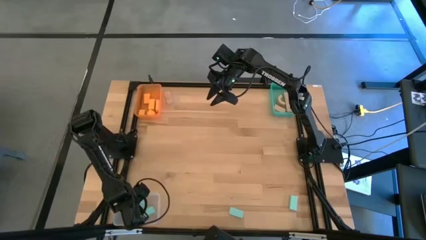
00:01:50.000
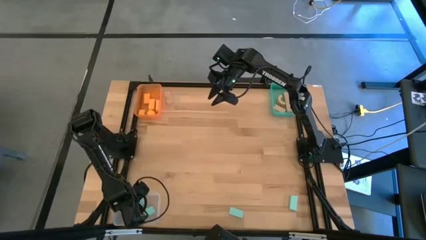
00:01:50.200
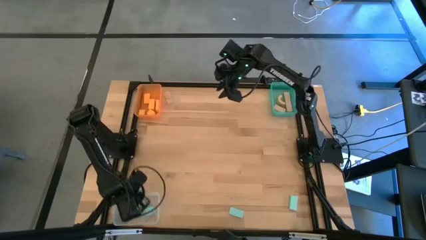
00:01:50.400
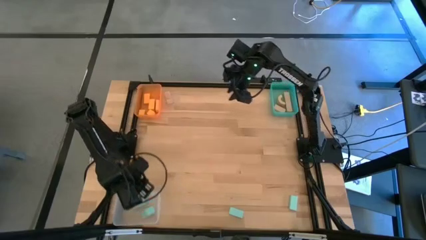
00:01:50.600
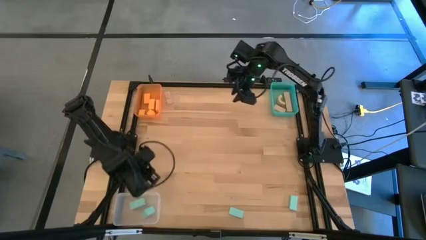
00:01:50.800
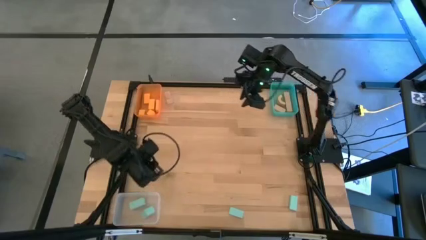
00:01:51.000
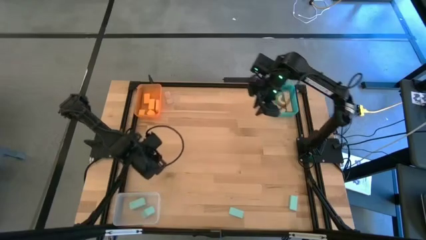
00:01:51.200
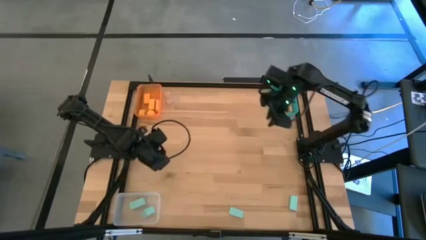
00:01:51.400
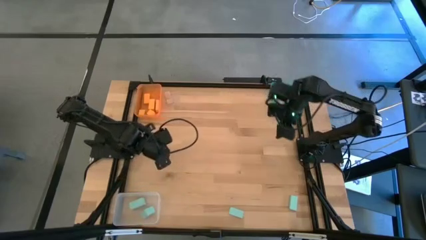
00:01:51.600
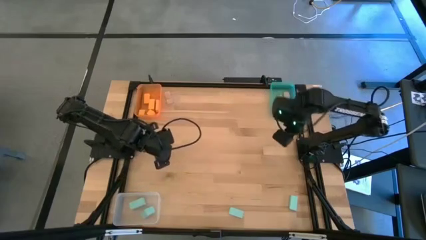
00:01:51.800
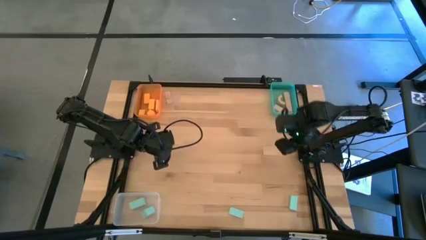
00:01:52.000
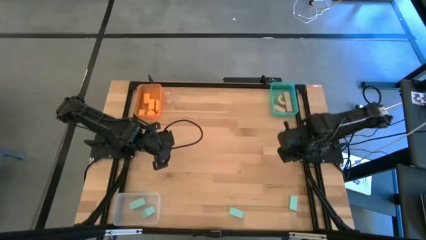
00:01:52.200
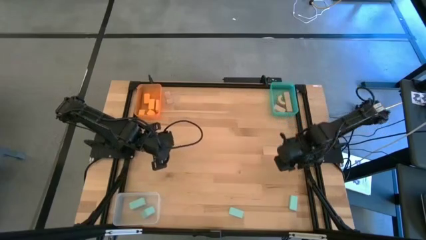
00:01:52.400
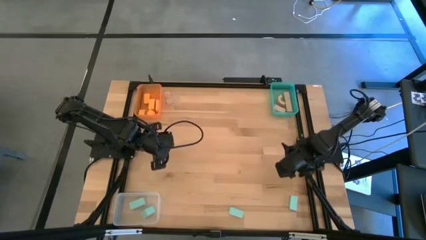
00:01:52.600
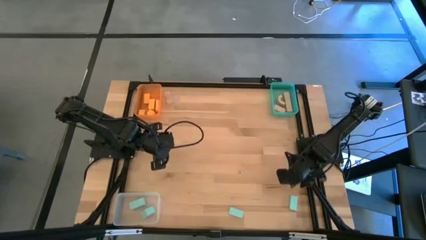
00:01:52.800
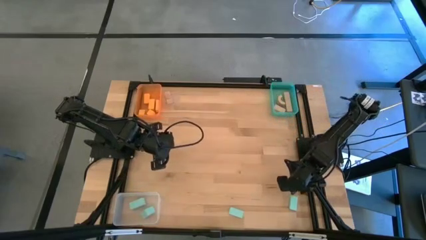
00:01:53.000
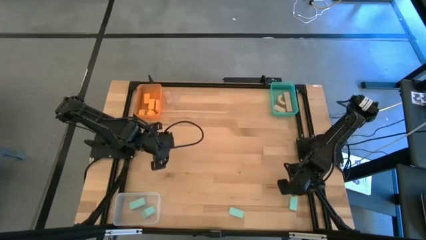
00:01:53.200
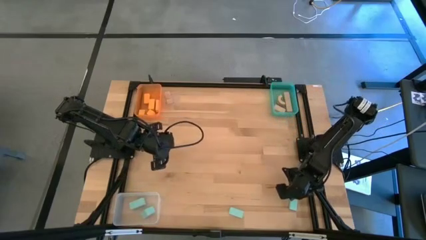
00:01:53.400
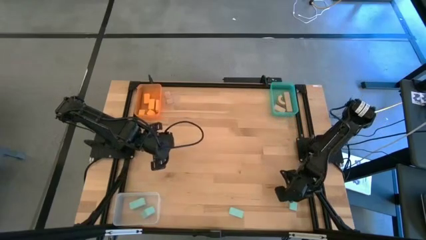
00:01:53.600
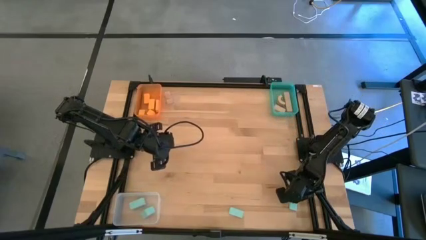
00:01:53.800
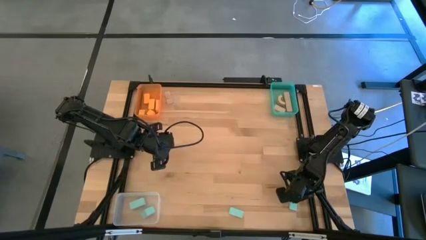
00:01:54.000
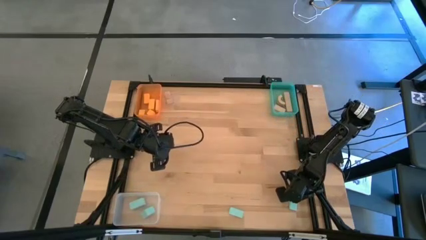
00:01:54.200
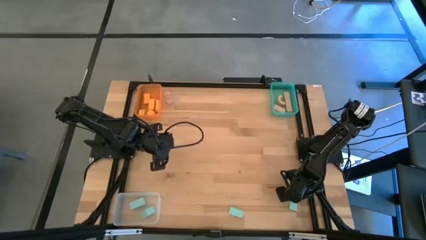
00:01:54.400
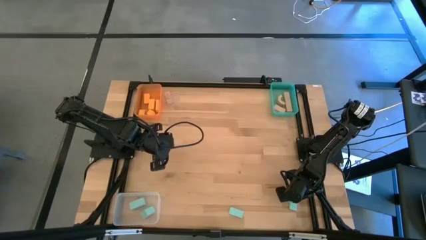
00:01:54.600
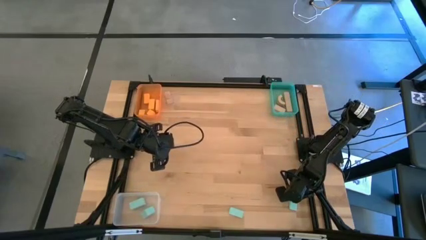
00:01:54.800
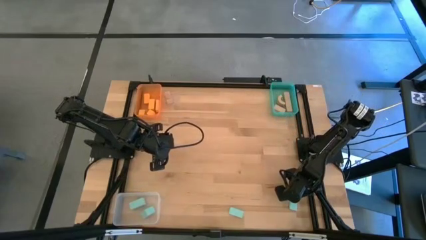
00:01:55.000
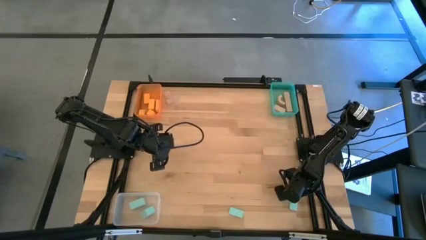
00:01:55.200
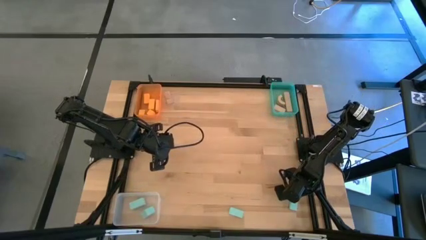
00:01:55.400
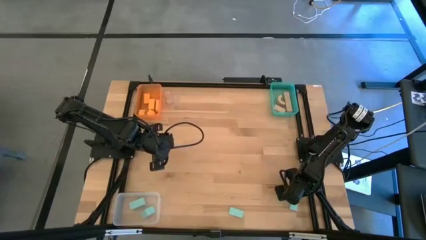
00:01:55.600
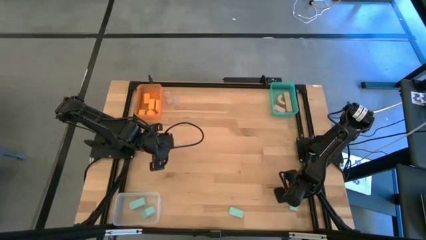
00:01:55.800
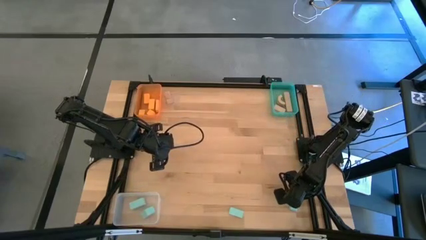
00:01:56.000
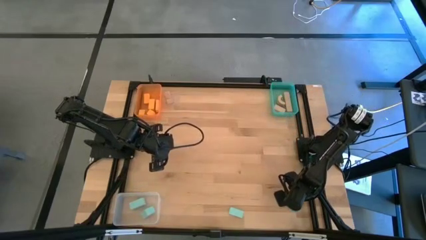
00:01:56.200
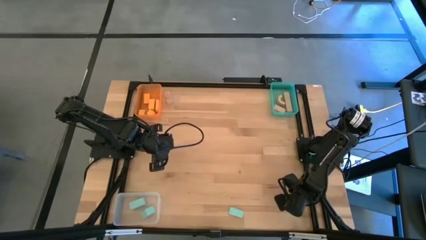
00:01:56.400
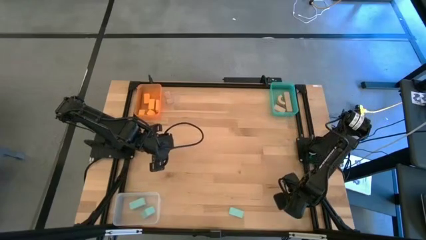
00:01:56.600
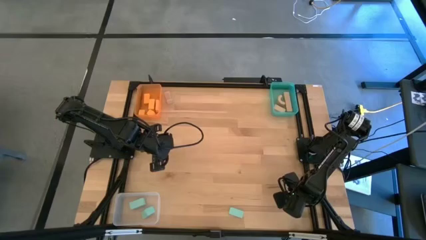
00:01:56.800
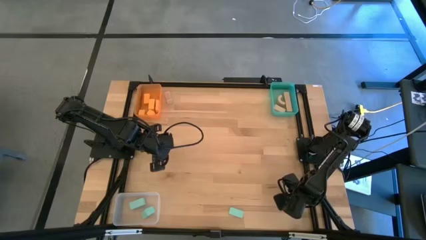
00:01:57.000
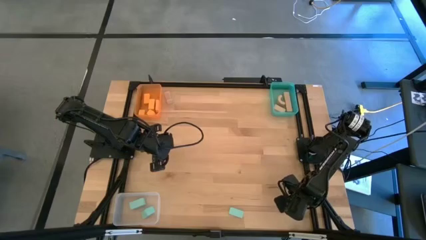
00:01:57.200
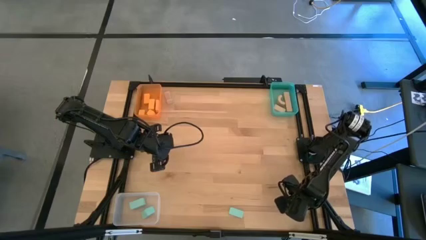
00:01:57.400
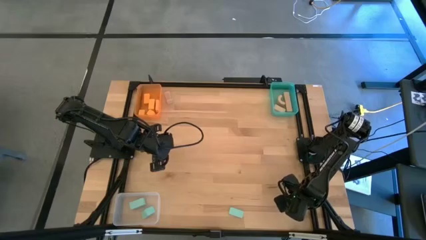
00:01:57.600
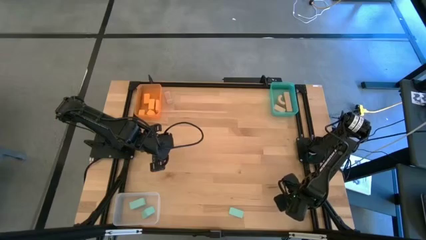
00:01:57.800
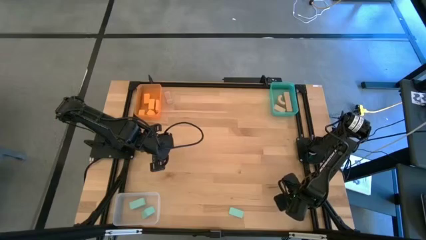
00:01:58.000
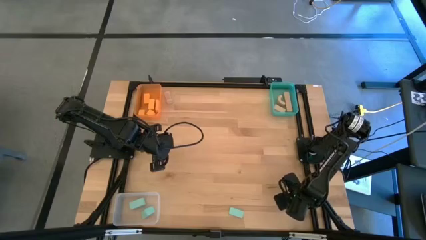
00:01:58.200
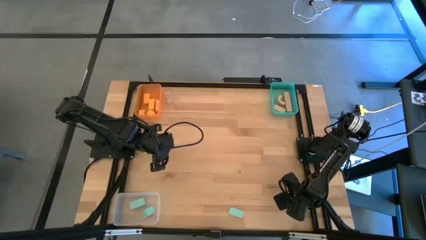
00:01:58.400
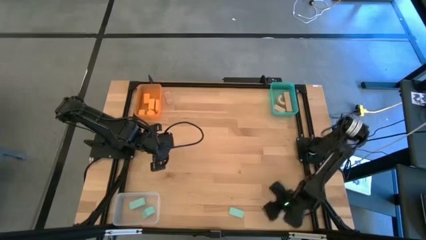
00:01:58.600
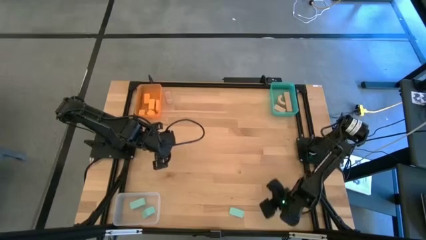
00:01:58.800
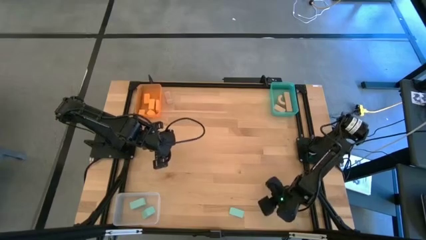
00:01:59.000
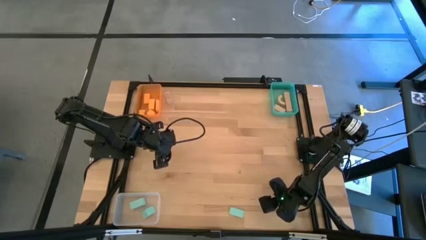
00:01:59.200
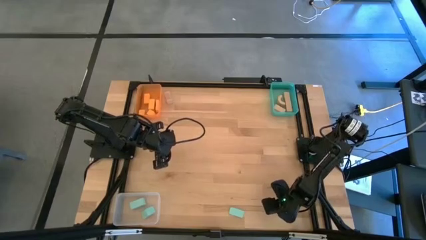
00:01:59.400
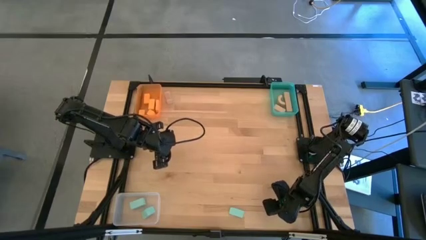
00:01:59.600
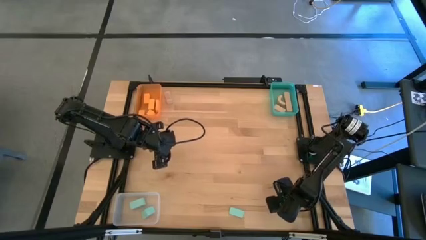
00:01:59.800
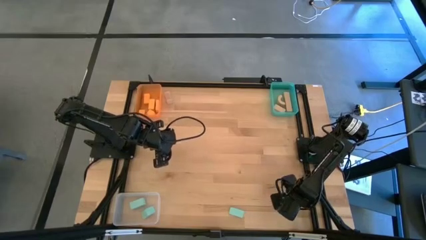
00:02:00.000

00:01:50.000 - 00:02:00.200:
Task: Sort & place blocks by color
Put the blue block into the transparent bin

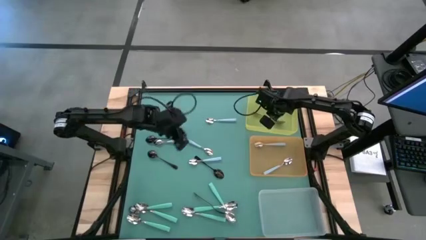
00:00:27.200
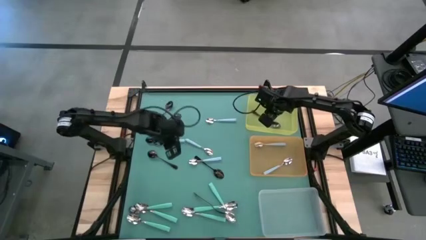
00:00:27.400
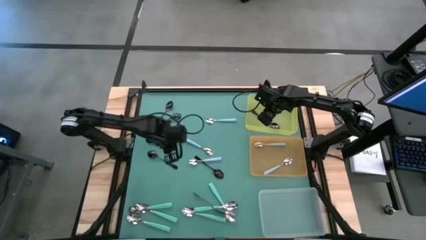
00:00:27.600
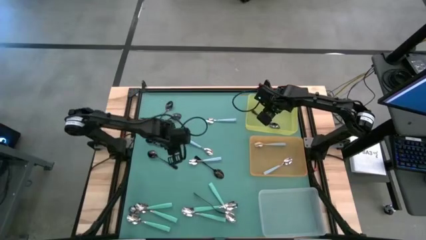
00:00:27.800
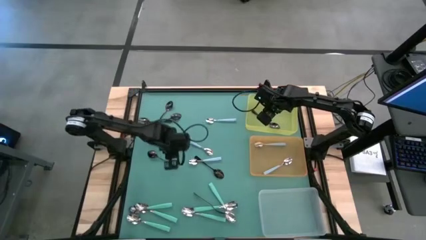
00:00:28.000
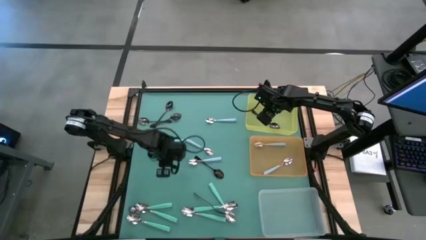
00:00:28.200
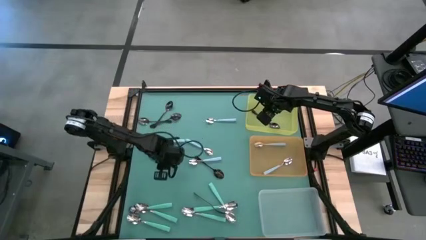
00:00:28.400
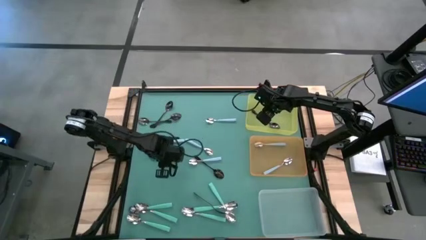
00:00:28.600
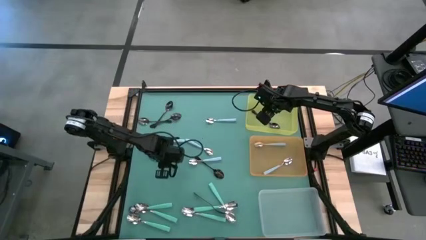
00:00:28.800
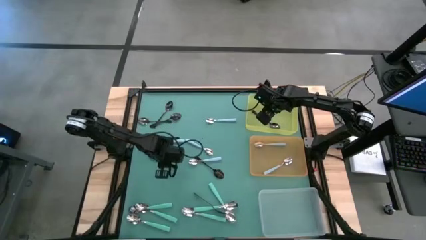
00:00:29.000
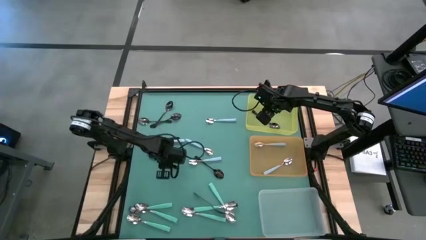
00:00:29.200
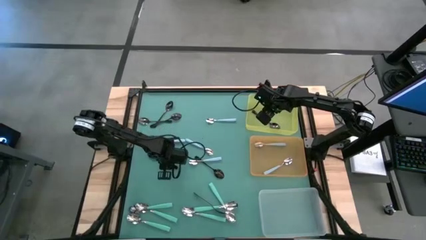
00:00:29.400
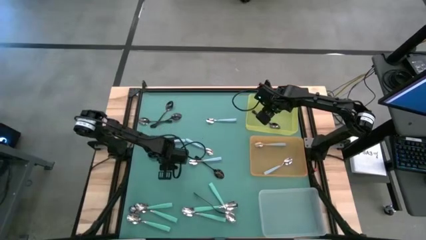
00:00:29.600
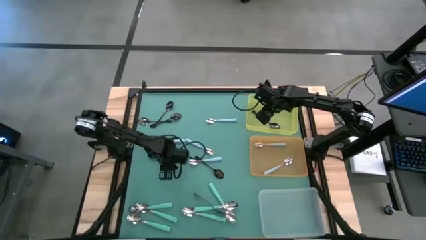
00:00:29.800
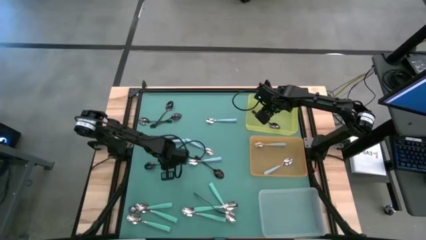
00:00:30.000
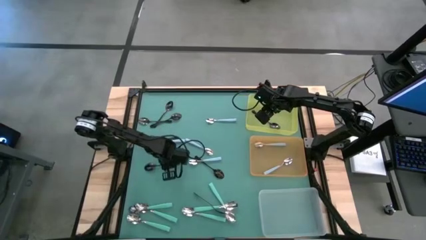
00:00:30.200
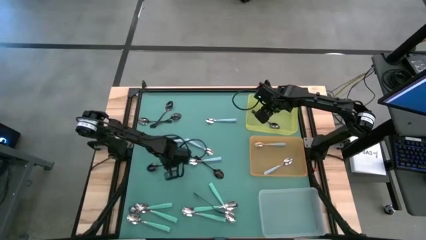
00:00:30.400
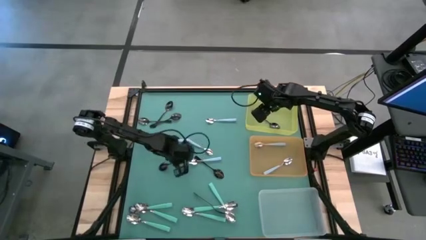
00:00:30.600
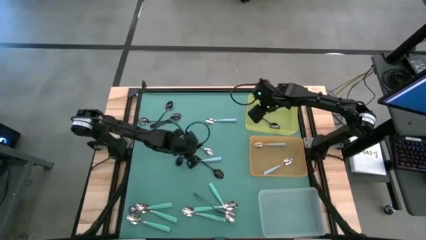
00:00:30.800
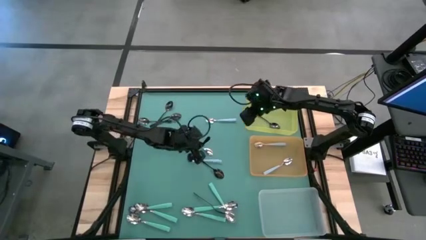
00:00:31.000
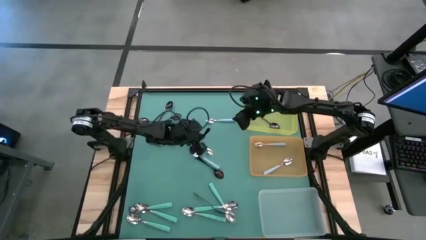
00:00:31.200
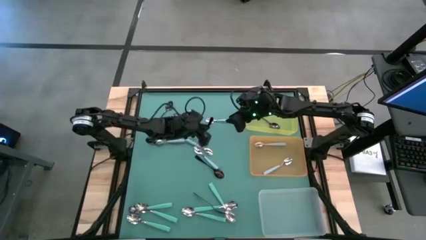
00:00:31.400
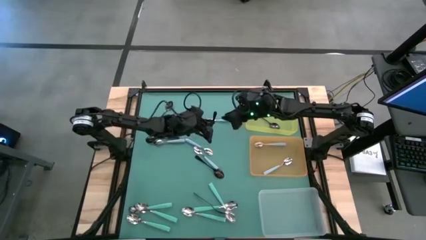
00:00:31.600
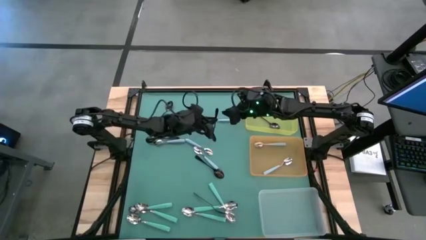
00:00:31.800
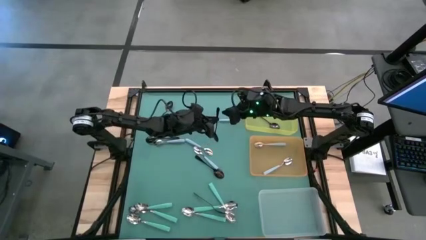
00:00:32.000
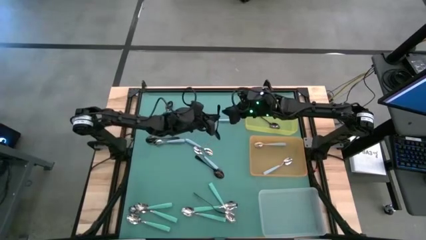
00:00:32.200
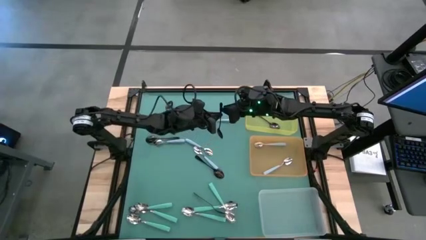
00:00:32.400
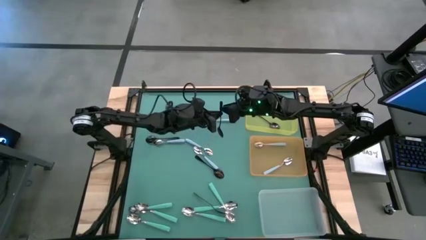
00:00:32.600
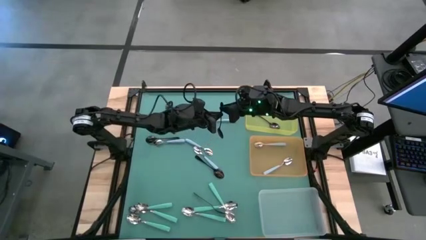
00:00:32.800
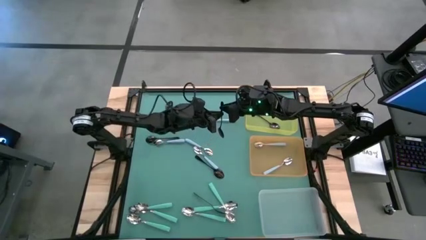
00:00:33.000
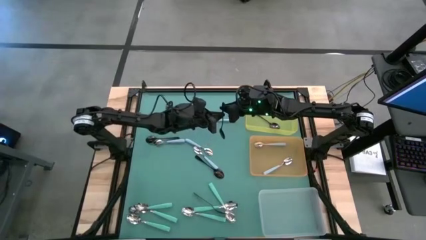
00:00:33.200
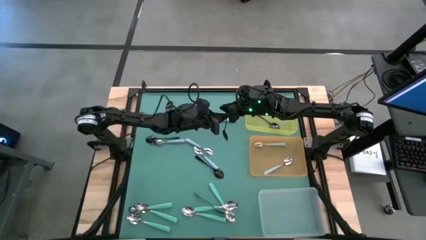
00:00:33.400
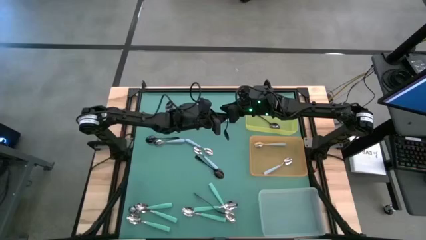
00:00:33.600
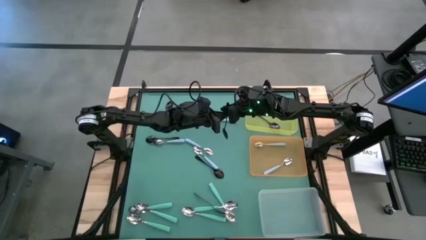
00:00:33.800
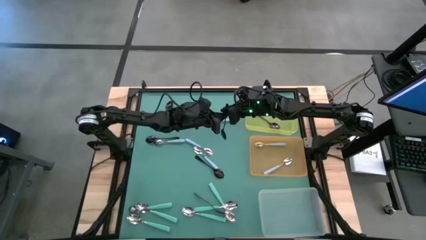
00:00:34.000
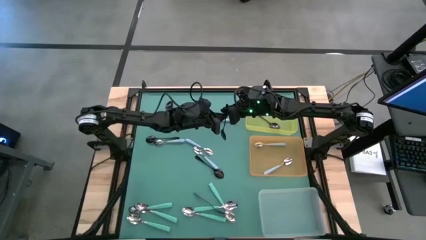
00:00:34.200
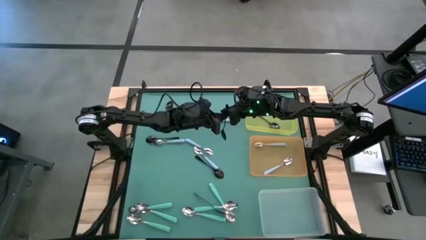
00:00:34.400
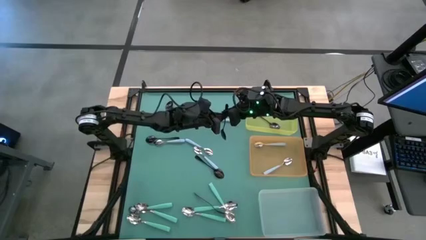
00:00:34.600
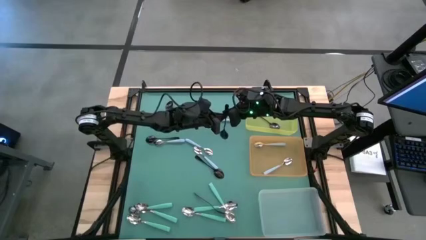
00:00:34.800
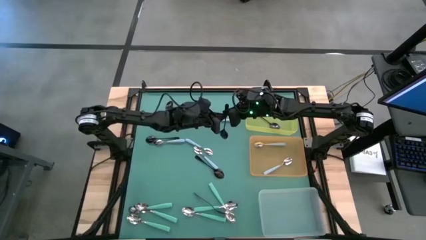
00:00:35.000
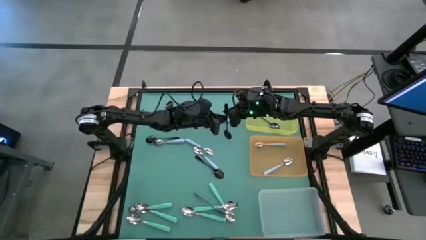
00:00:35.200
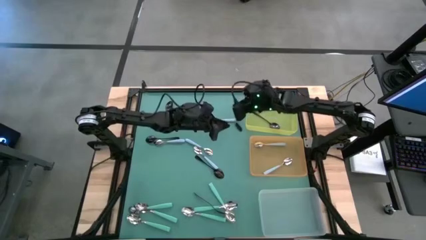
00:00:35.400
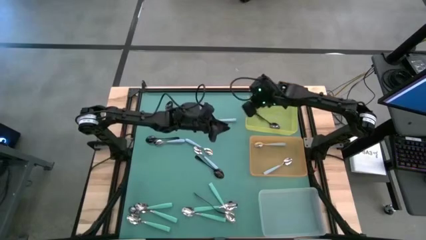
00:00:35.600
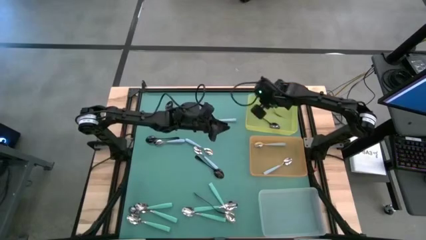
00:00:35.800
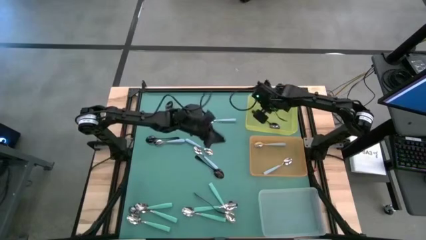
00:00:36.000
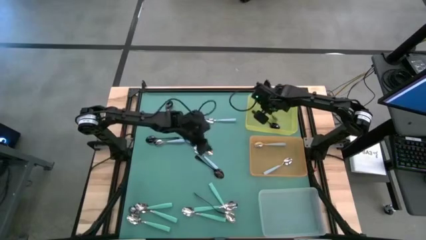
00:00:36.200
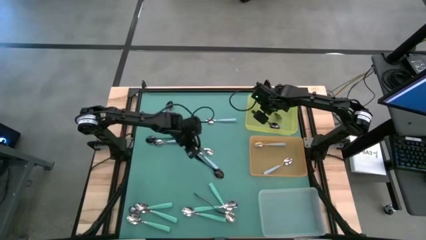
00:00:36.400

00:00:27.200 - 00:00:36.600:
Task: Sort silverware by color (type)
Put the black spoon into the yellow bin
